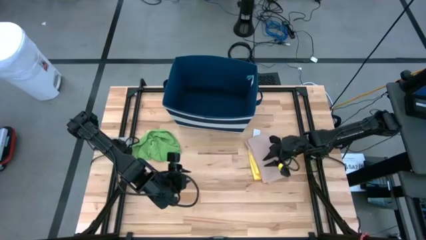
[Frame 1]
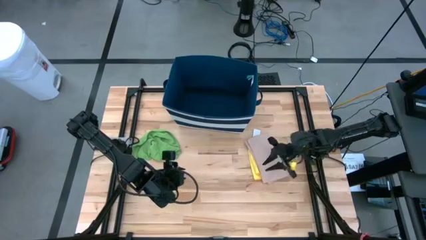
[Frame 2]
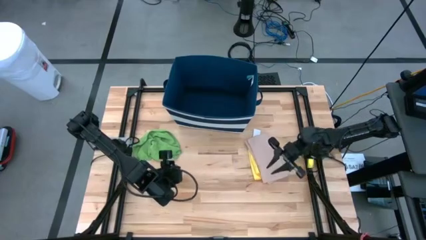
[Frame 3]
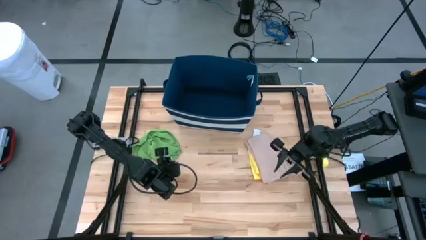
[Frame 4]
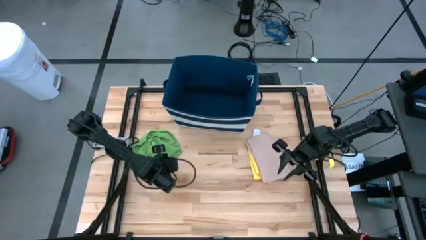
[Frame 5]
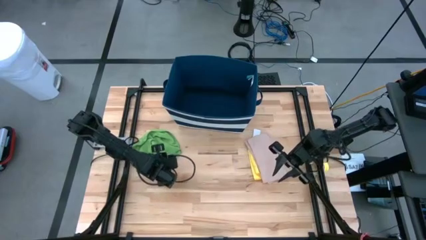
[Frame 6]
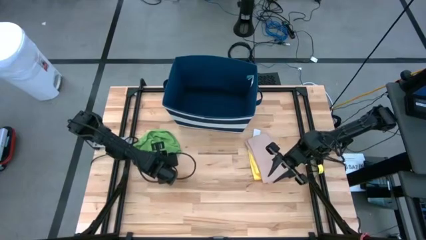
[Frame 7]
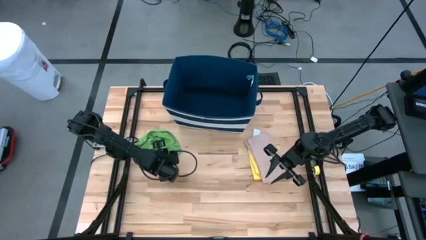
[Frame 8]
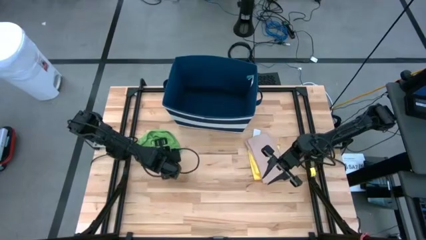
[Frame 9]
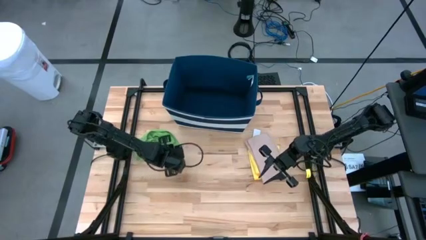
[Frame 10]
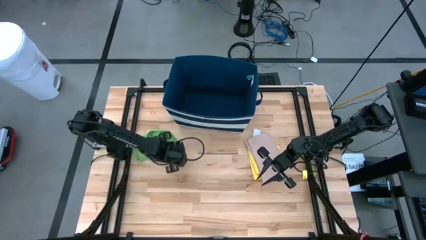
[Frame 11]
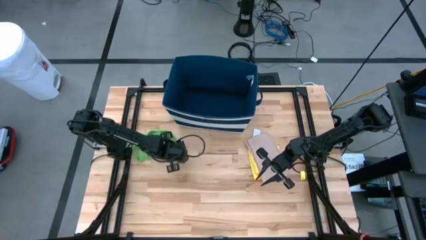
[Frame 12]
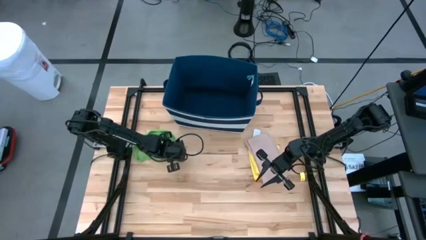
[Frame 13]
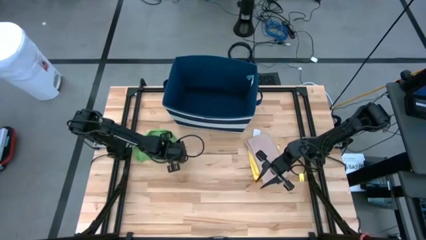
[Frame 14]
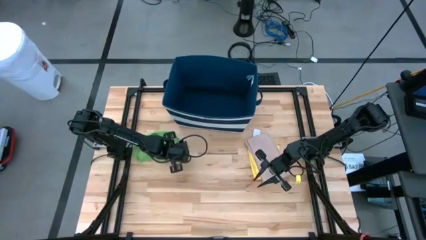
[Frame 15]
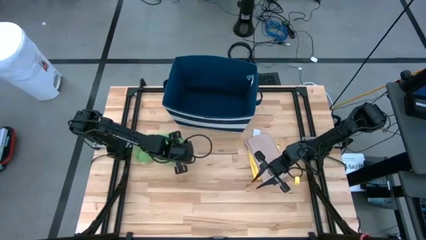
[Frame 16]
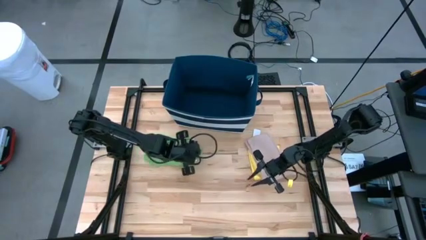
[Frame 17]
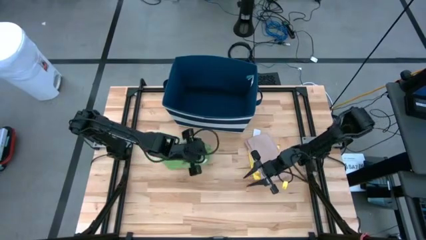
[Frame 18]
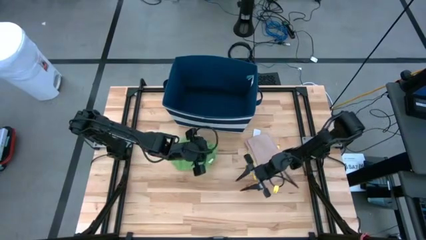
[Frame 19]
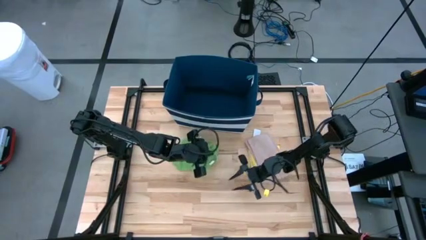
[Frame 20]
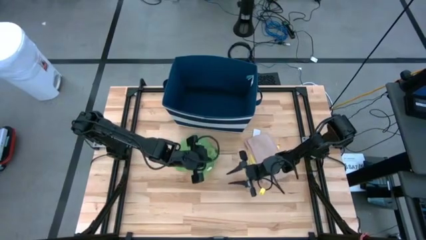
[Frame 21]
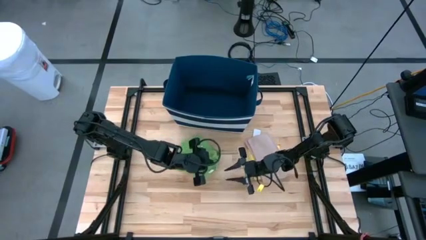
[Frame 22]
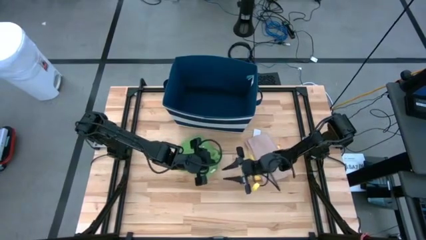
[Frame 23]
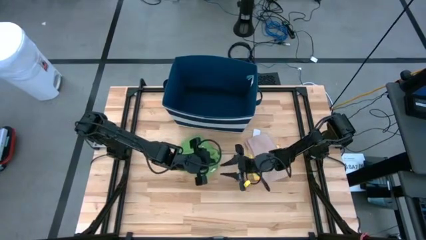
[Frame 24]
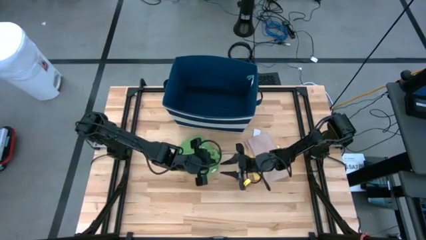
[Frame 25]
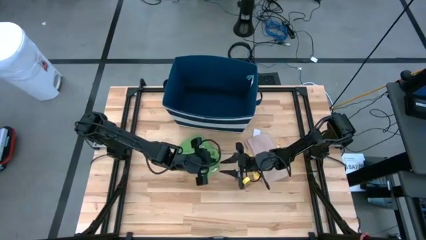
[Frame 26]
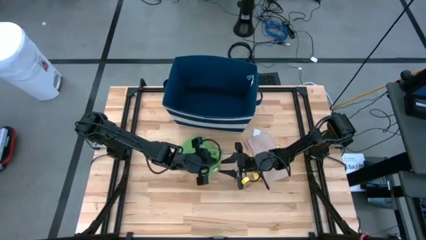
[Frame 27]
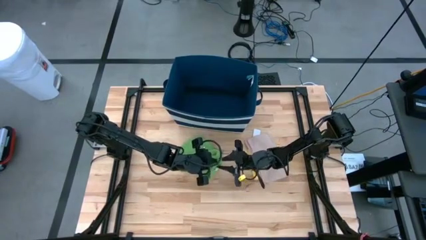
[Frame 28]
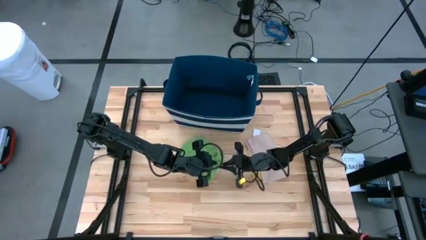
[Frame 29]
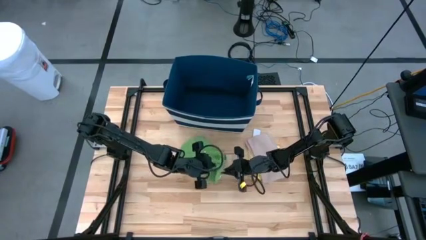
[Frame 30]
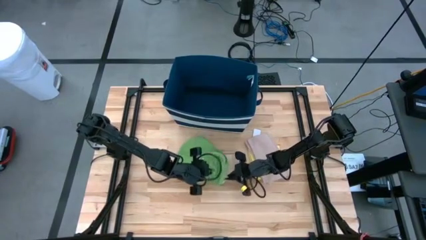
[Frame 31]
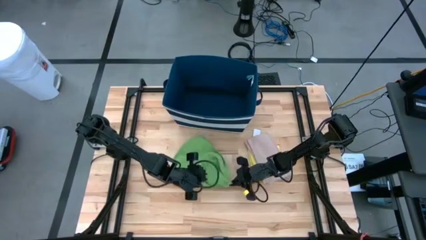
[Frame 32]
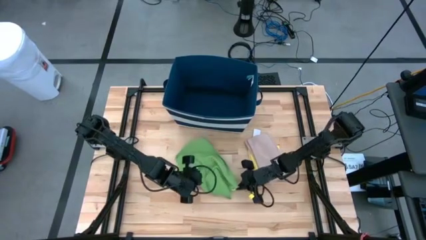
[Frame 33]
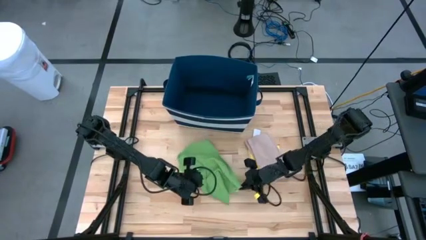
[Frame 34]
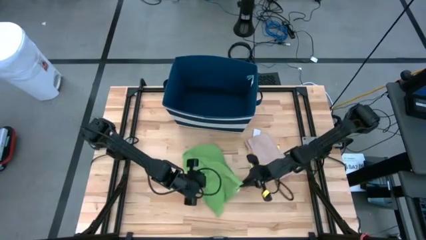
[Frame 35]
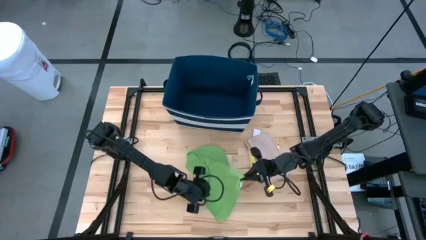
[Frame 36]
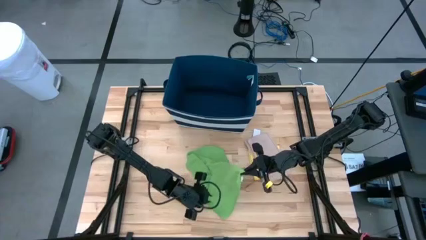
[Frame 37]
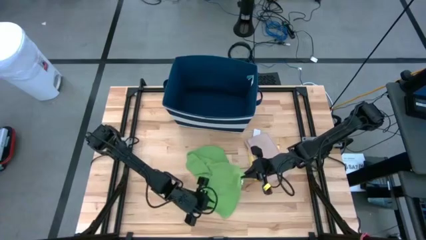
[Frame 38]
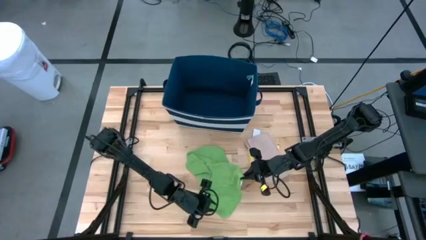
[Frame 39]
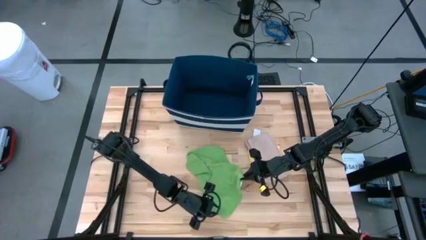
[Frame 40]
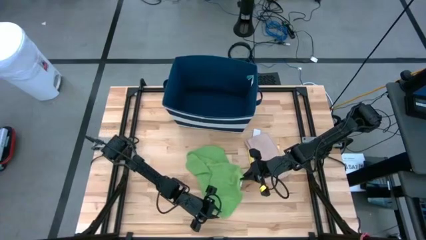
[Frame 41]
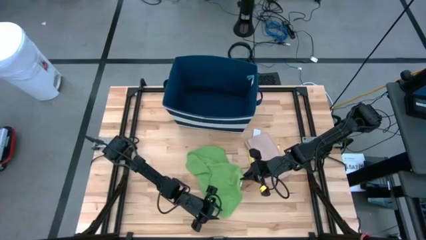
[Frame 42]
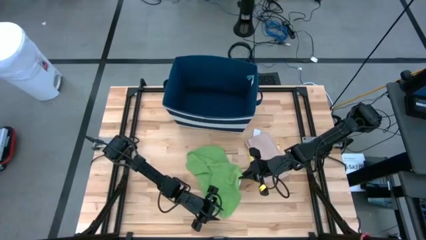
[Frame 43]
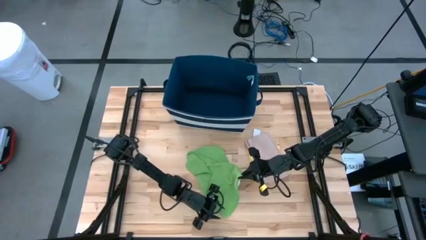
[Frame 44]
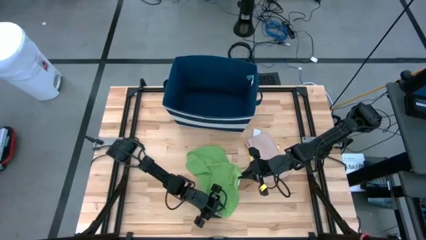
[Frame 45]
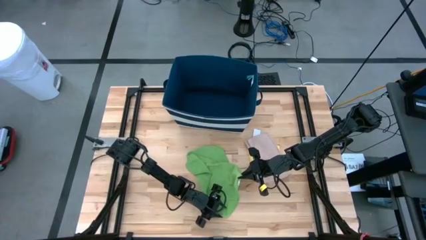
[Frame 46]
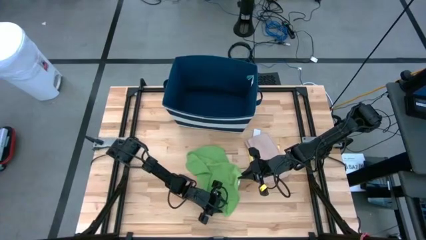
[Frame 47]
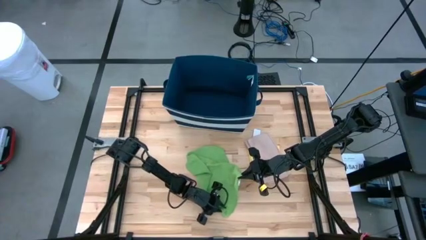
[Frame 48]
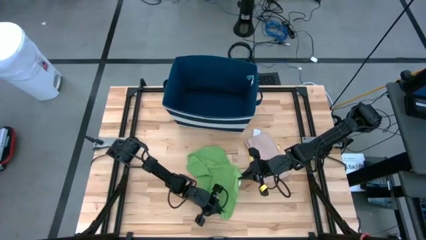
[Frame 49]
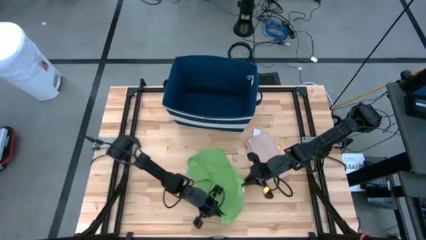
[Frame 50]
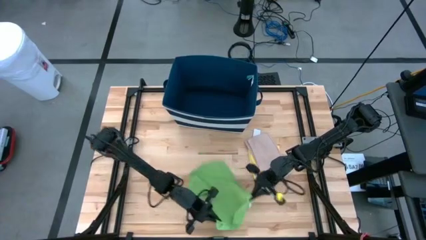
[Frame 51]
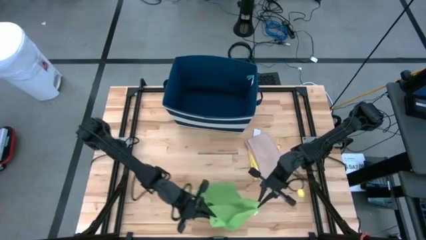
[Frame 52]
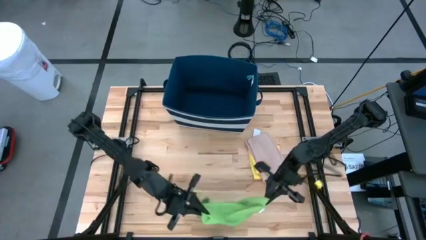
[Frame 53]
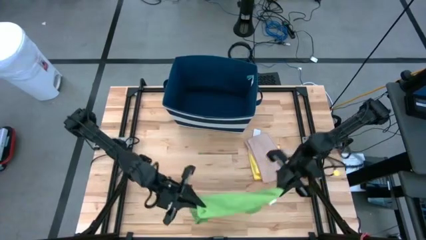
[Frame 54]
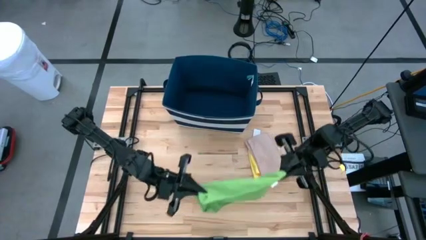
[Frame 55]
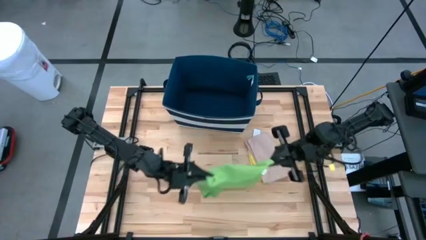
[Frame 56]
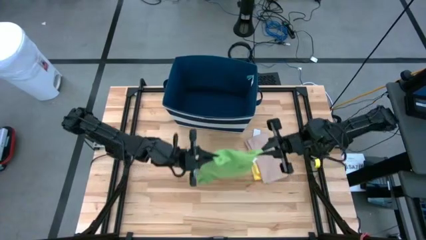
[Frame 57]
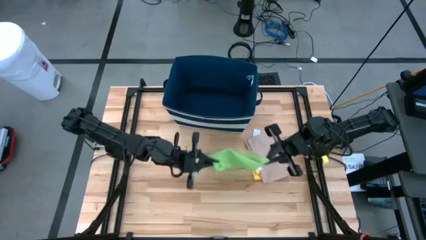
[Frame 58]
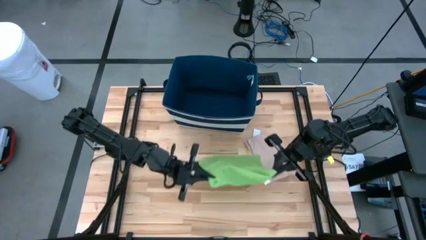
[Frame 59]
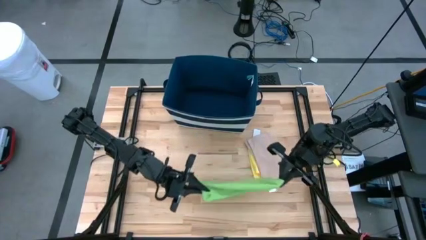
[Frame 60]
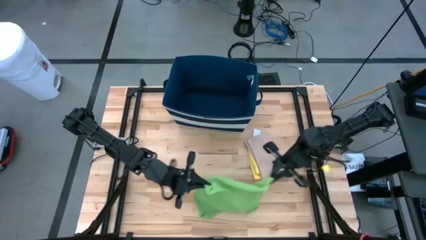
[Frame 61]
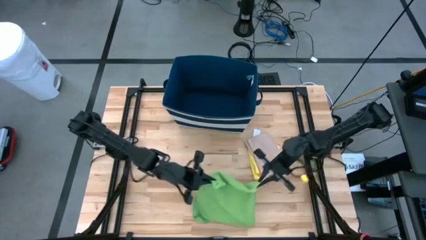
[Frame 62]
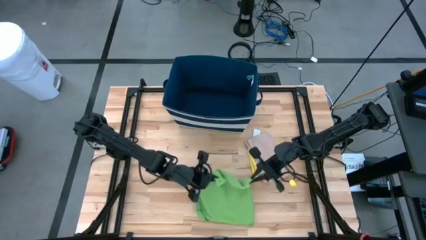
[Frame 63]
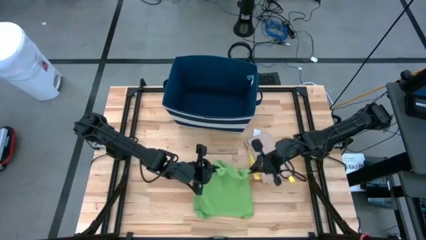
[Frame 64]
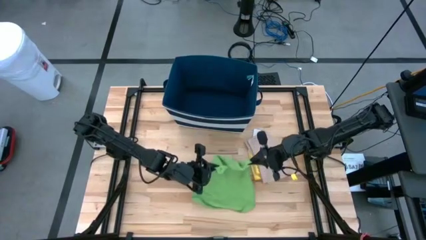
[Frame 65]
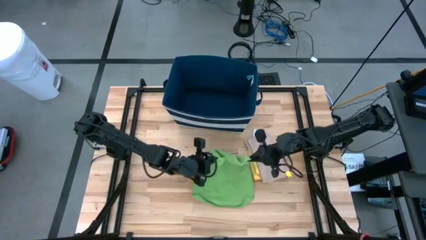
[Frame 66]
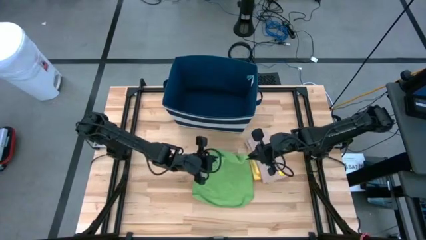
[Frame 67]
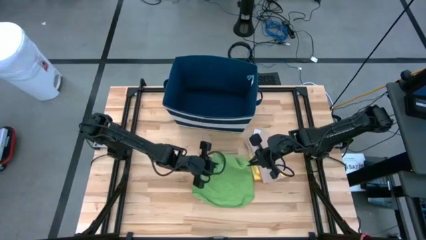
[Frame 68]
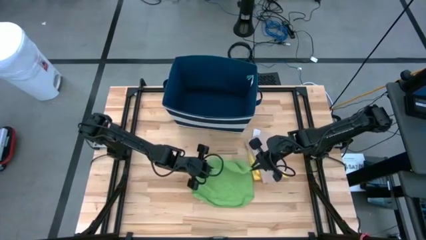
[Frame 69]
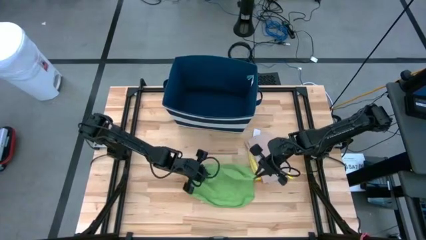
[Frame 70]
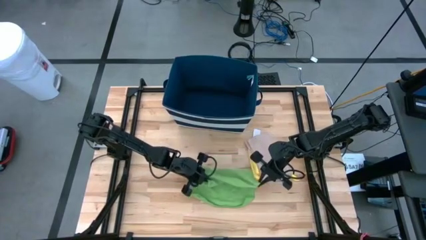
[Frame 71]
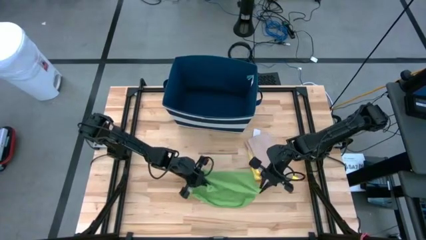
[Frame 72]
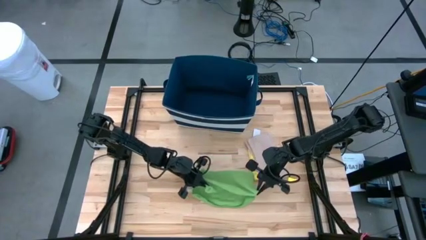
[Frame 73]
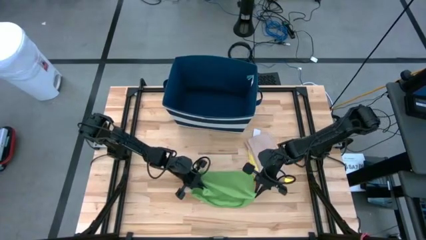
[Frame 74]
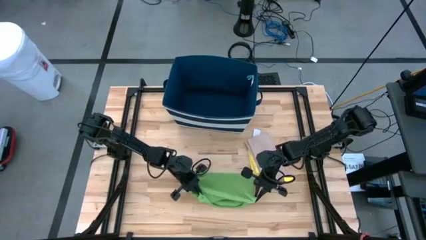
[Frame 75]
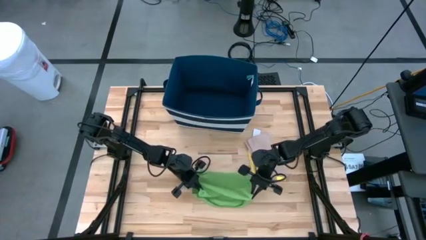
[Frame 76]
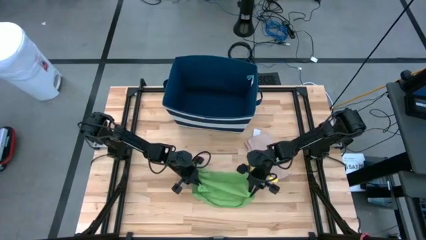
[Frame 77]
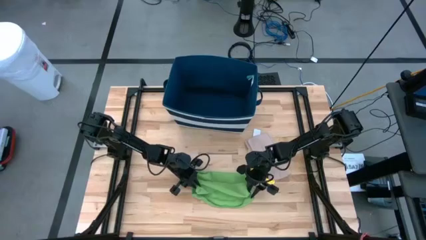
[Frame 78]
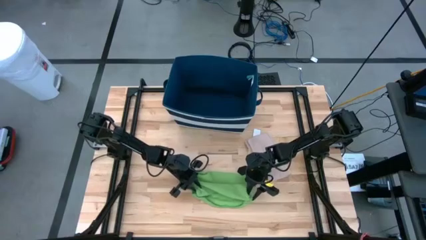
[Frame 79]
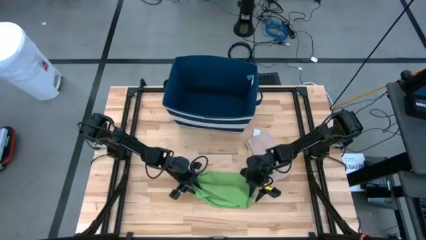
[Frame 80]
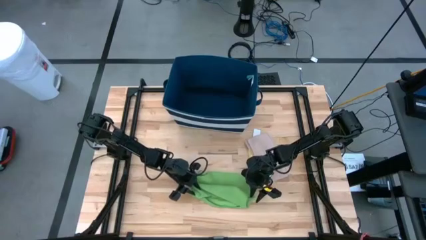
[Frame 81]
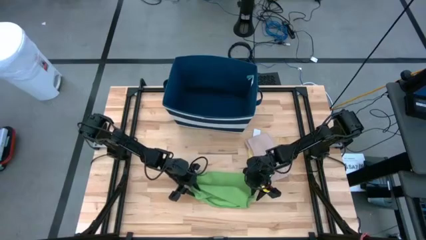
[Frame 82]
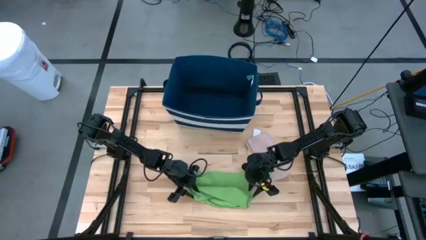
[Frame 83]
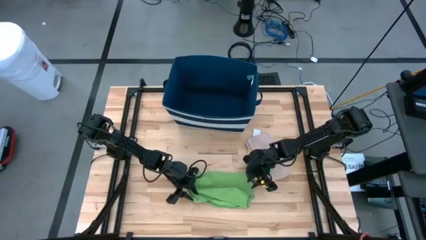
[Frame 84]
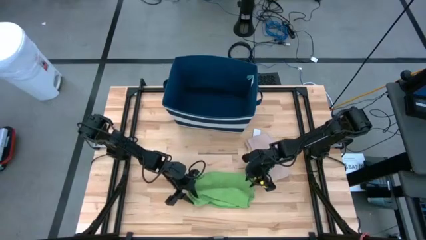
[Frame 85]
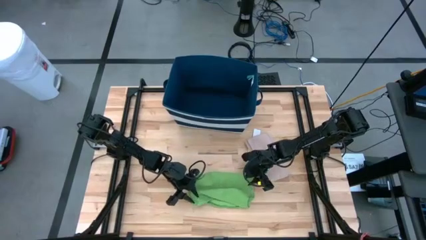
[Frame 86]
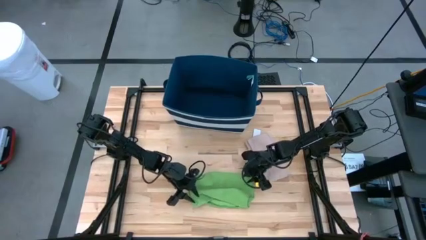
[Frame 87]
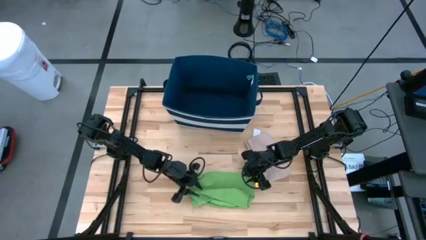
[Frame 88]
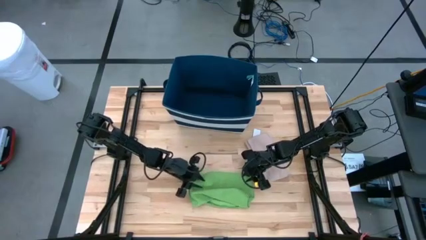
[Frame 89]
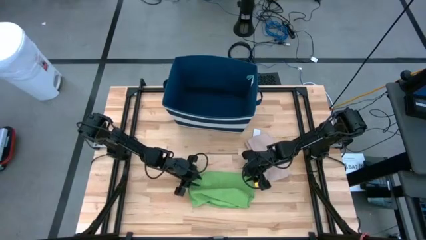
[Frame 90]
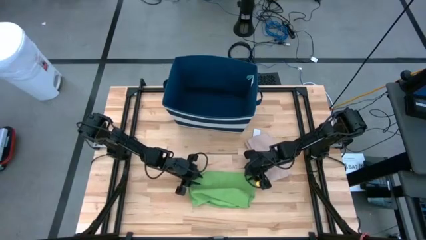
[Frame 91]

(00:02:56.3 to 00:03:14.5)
Task: Fold towel
Fold the green towel
